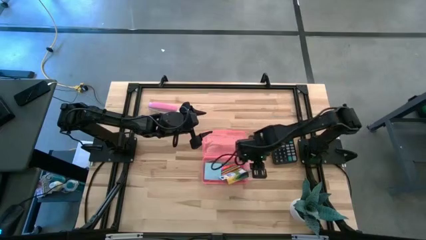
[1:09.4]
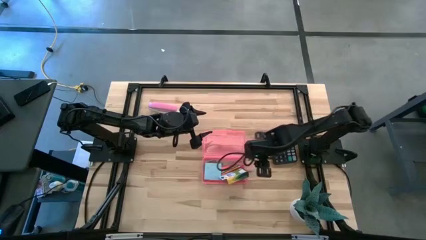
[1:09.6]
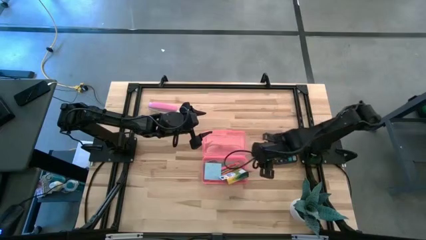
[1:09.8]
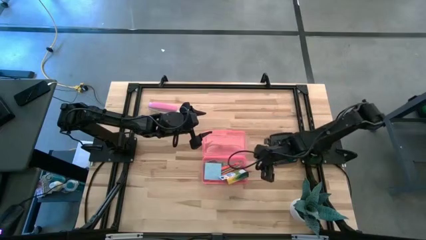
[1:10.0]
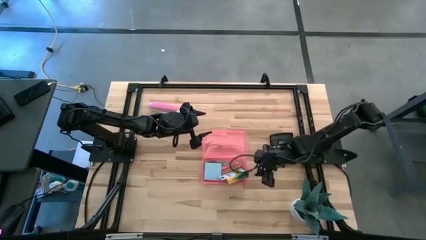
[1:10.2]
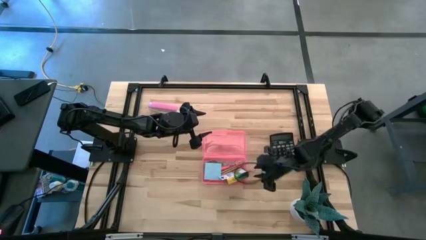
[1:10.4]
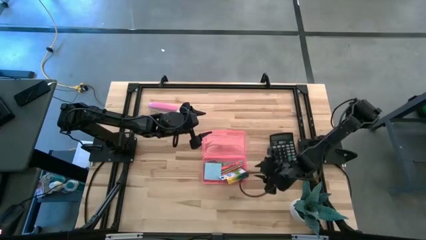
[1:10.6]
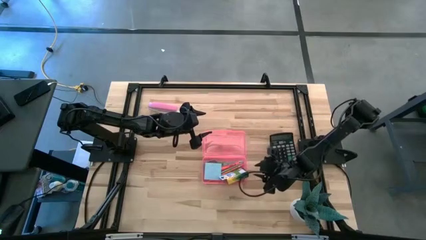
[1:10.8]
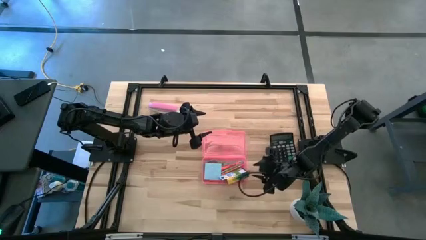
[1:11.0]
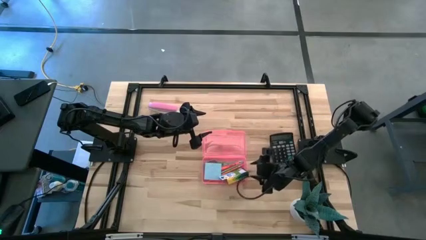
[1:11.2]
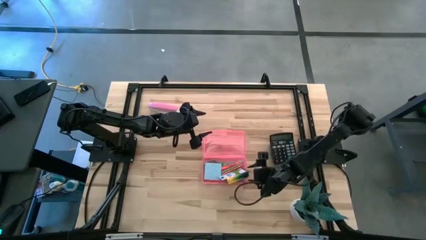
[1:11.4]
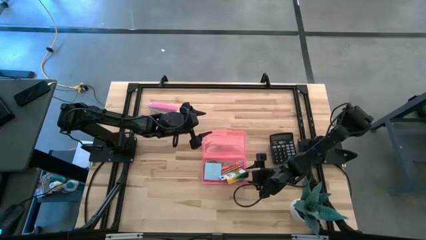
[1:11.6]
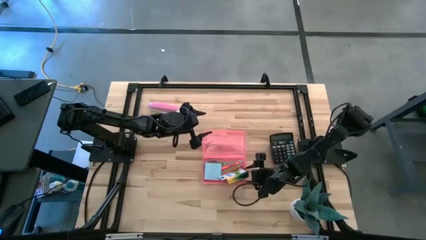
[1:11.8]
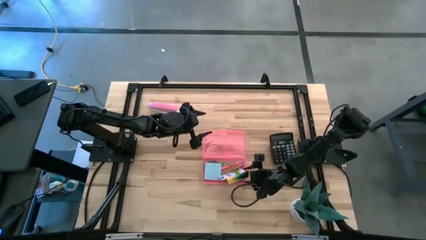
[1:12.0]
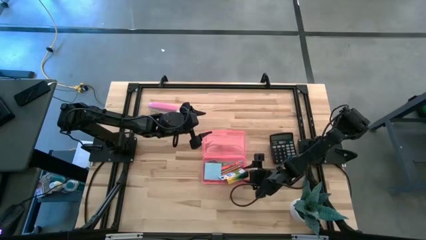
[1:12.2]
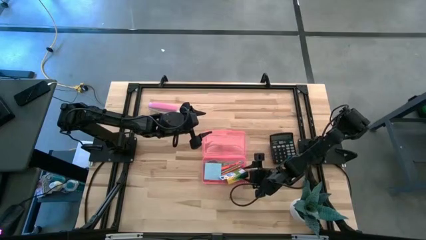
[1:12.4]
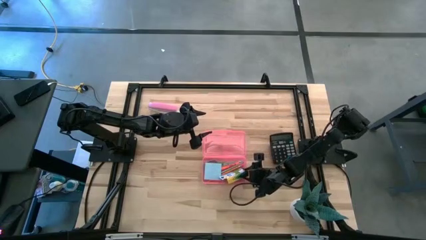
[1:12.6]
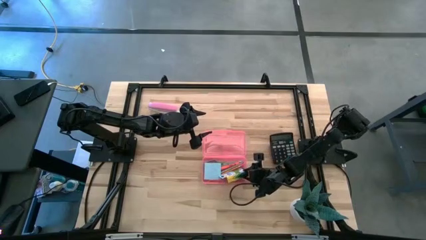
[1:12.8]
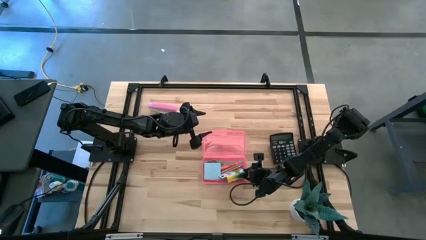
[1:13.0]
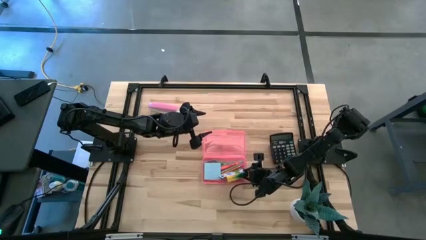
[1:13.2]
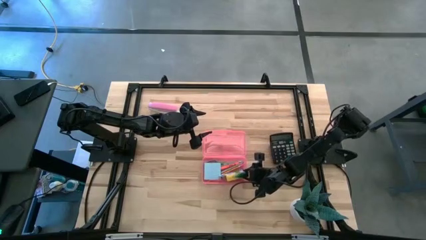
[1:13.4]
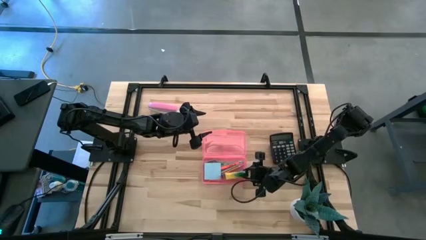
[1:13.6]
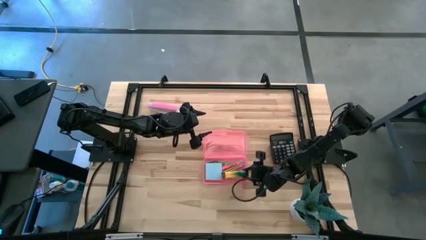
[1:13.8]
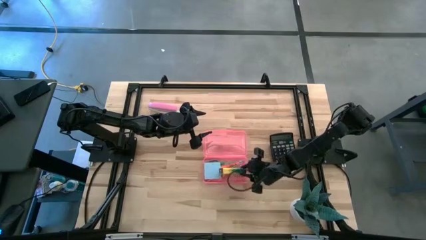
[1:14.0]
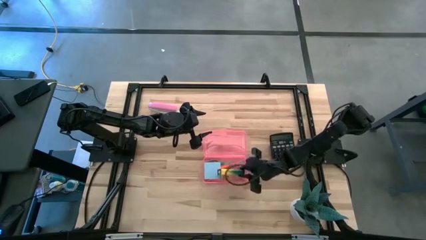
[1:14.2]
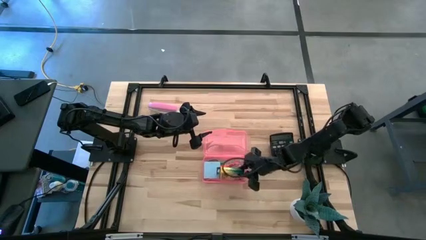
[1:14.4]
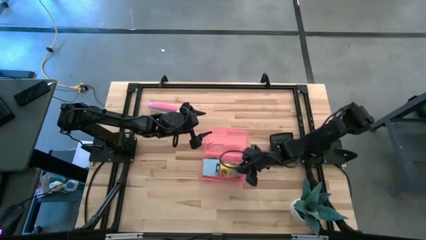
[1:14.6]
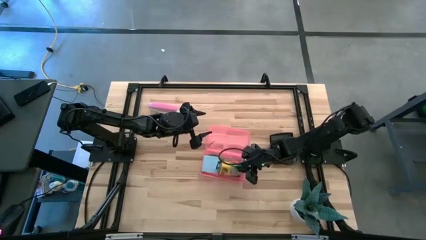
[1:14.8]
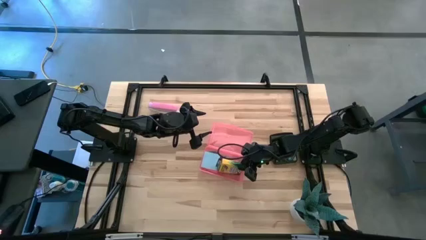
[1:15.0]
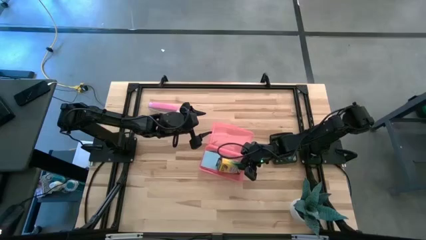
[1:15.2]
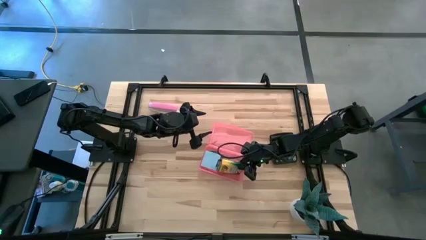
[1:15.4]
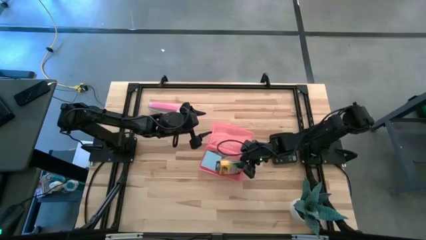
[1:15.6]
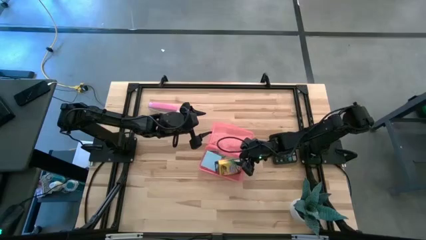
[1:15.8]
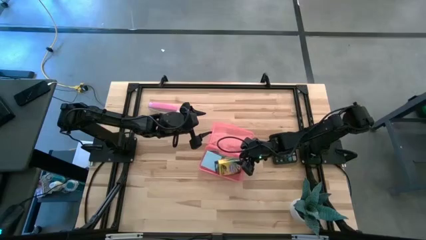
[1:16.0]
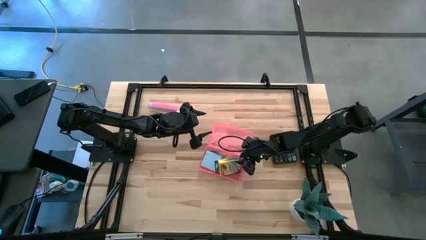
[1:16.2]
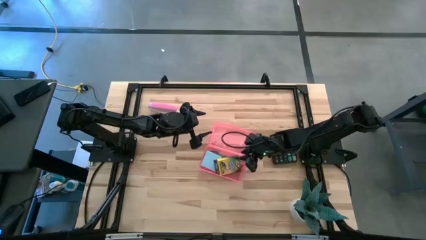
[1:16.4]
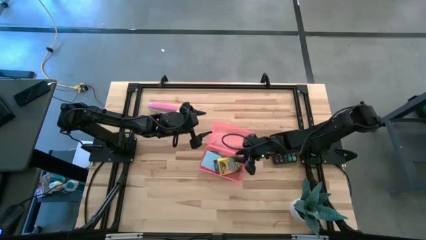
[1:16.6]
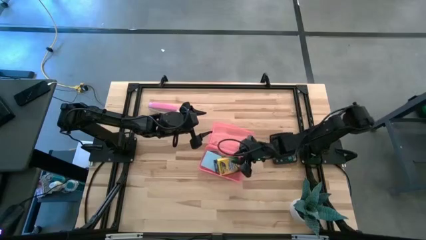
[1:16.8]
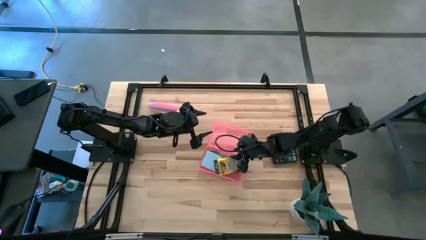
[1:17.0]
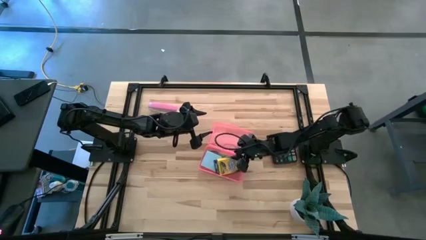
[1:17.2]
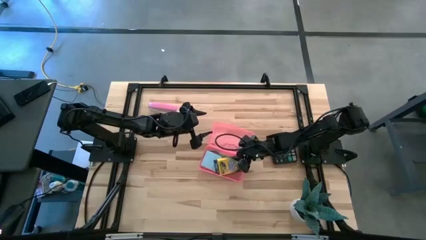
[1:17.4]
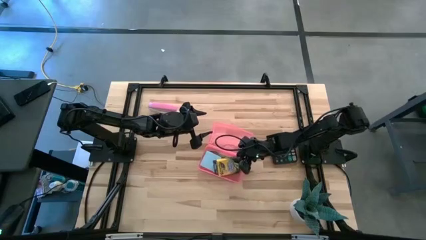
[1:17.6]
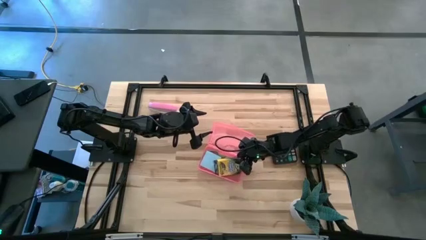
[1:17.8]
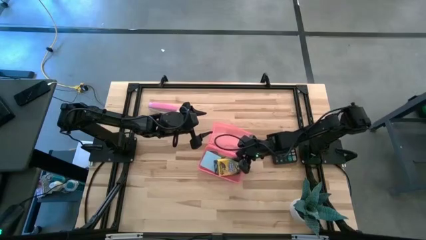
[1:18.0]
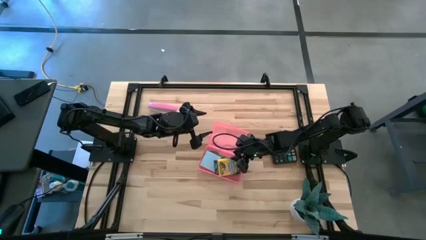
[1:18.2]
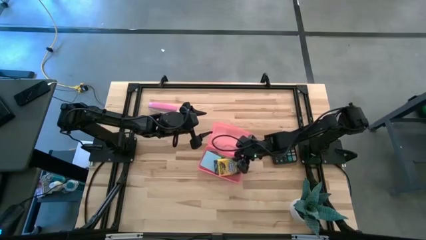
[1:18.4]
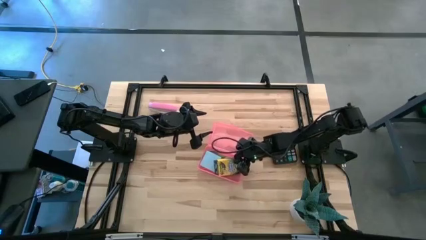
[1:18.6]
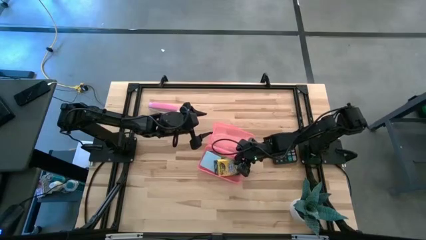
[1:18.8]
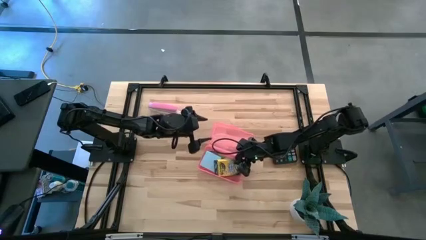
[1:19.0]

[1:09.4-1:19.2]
Task: Pack school essentials
Put the crayon box into the supply box

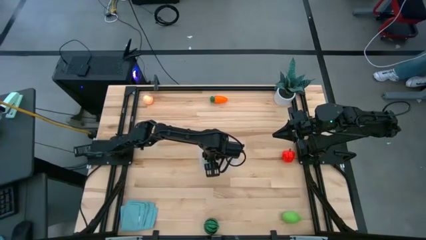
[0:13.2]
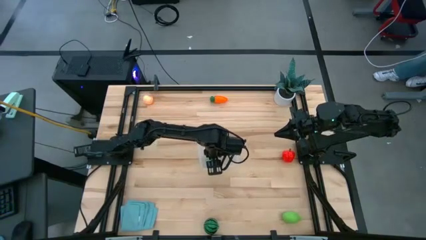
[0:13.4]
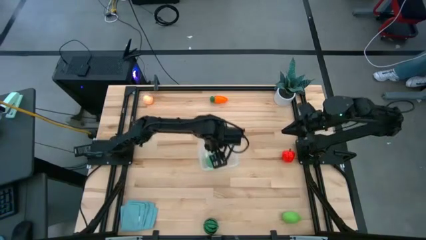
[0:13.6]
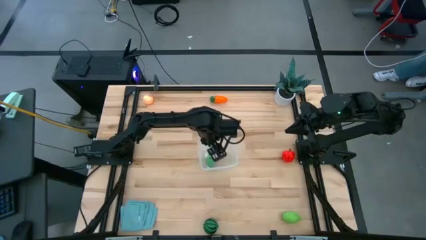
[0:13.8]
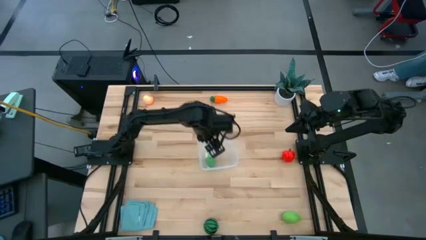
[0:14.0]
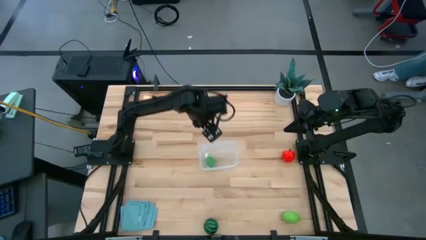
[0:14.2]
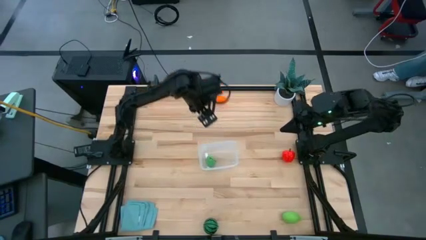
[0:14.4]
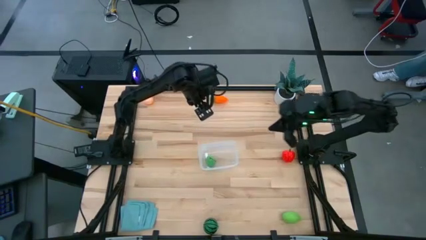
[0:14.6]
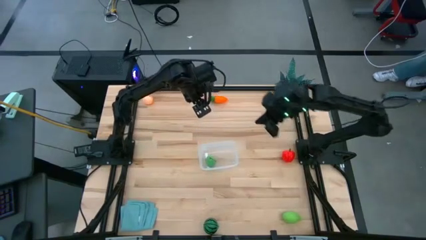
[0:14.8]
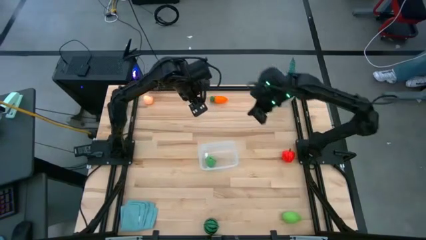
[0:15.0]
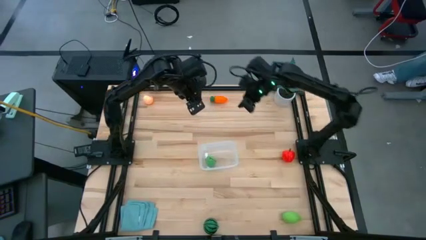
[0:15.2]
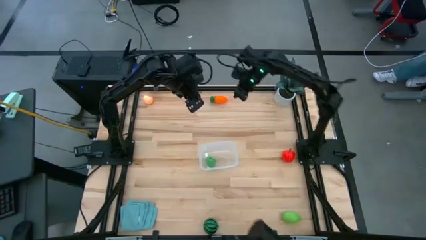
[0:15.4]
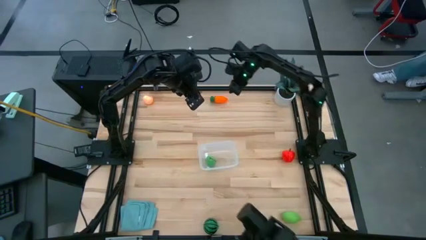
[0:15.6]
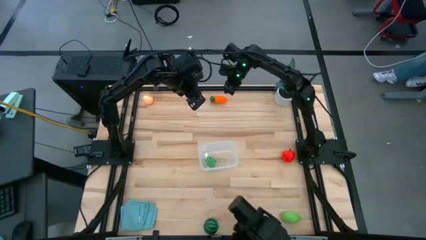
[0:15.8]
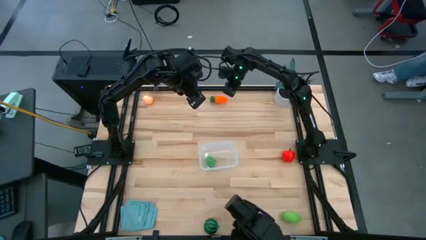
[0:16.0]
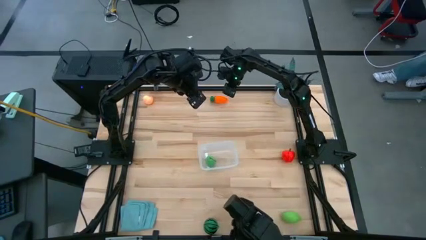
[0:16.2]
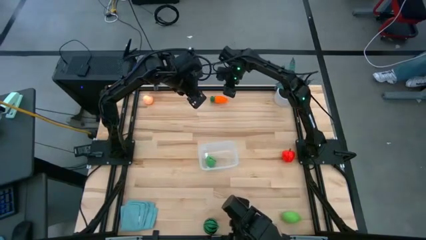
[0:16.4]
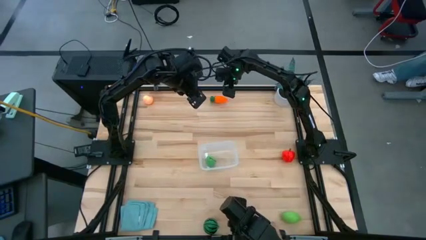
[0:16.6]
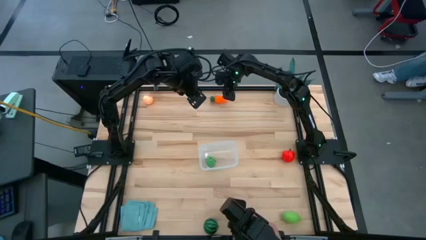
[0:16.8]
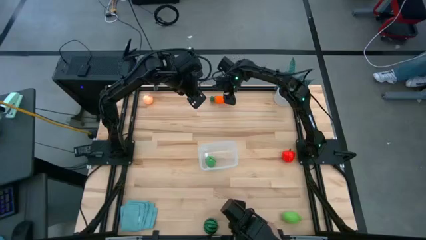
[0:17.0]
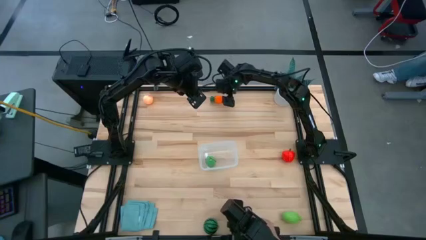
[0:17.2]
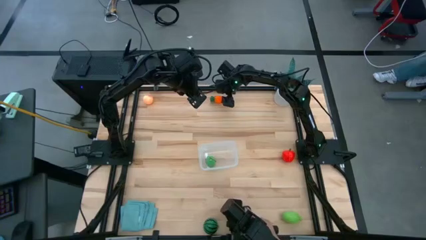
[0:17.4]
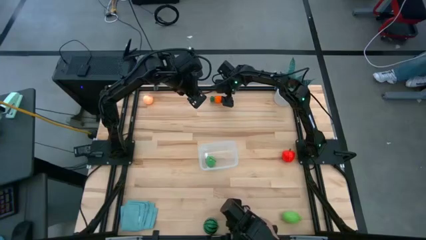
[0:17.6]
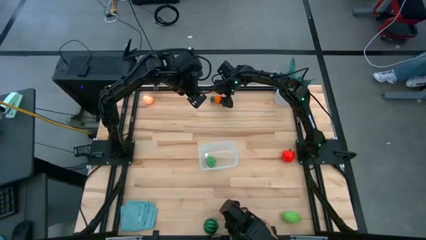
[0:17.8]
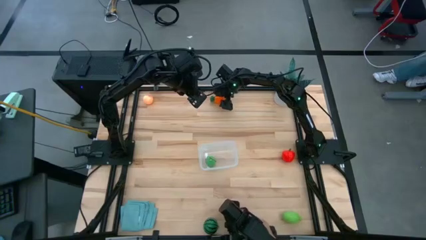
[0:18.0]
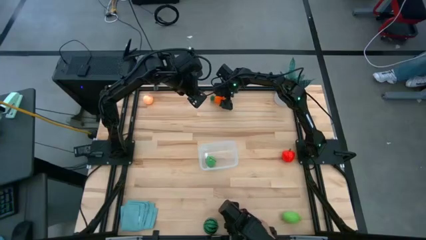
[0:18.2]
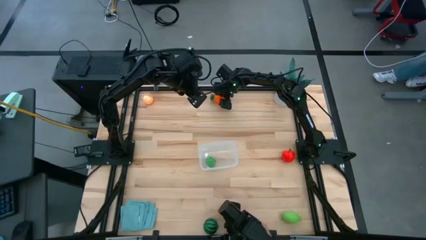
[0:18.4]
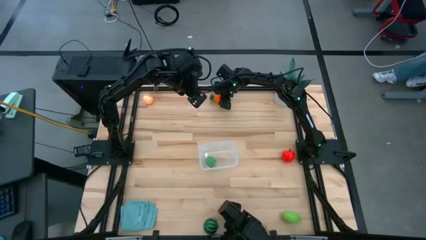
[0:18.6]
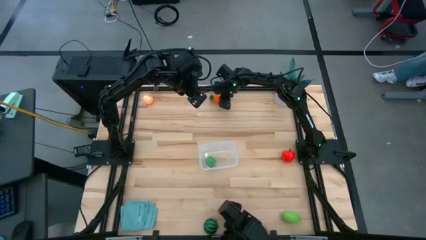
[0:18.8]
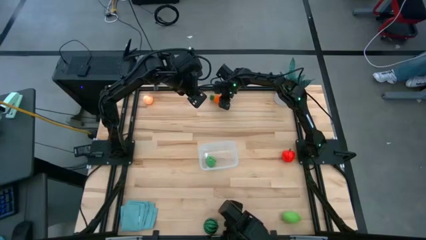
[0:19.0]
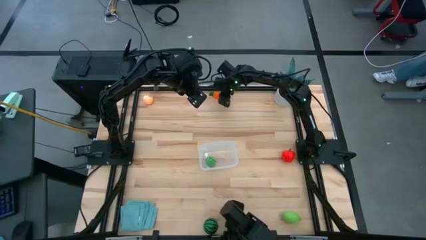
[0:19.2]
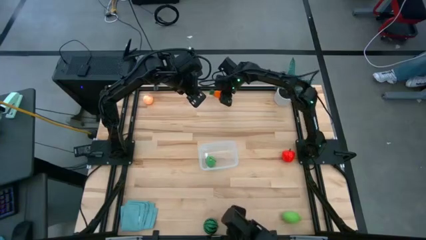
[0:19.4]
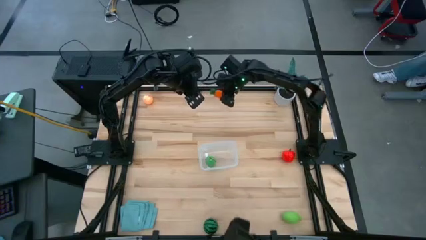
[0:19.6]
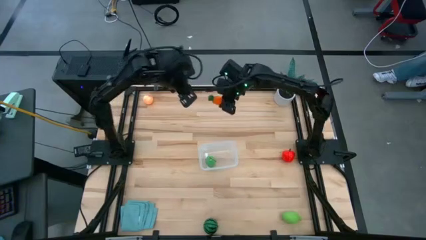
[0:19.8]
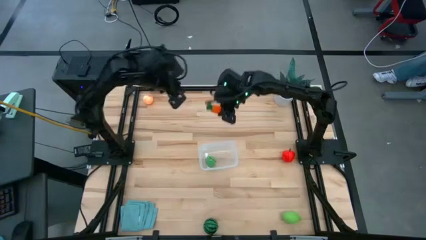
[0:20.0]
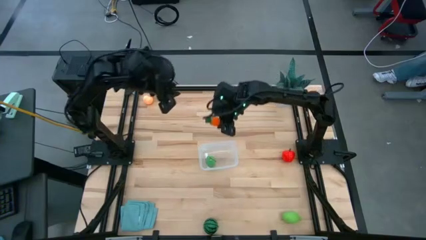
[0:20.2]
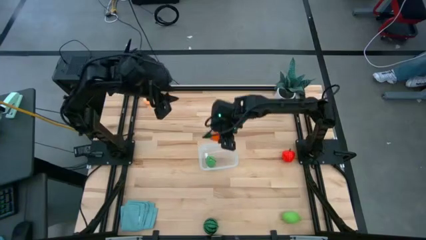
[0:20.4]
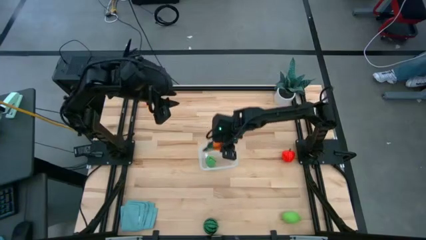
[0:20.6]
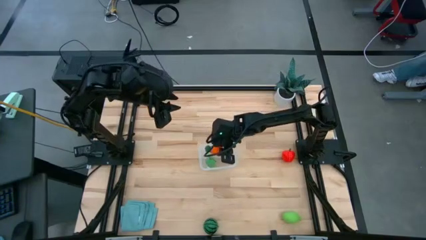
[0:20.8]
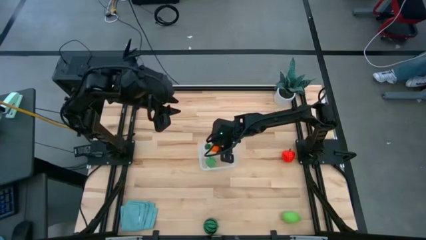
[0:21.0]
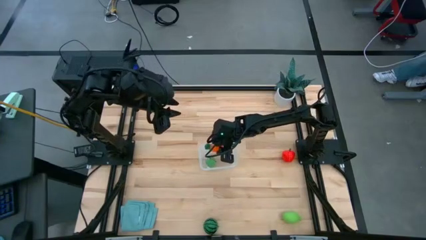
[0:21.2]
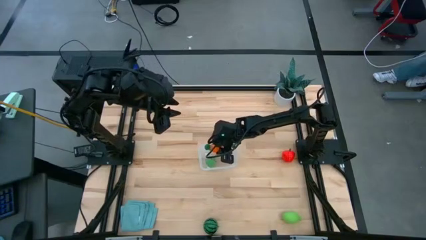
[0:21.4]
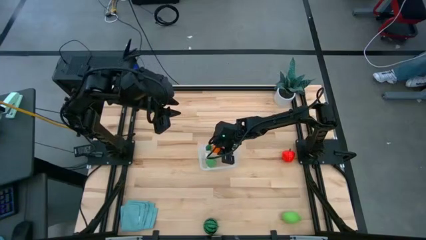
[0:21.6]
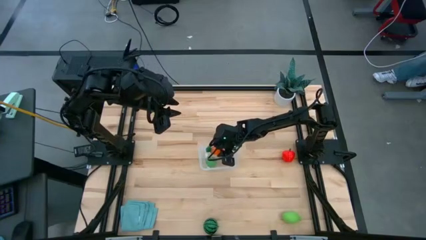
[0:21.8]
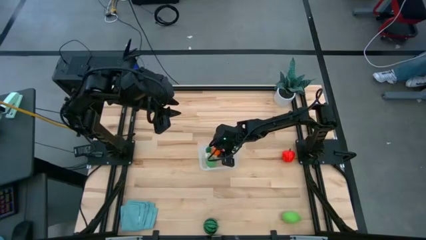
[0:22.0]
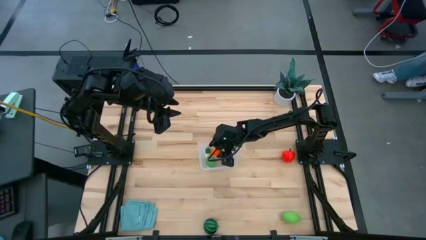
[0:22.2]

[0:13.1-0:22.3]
Task: Pick and placing Produce into tupperware
Put the orange carrot into the transparent bin
